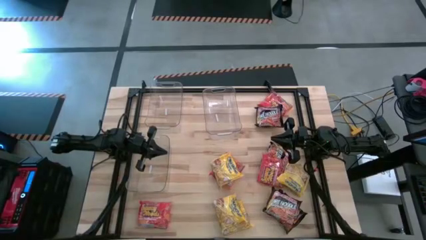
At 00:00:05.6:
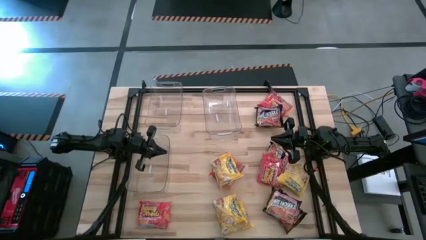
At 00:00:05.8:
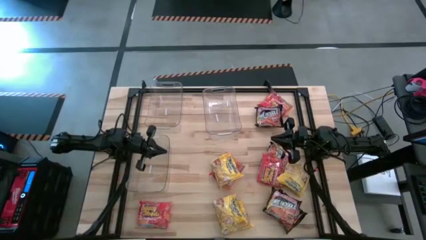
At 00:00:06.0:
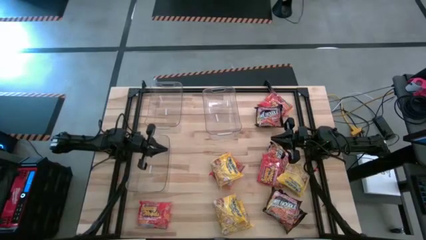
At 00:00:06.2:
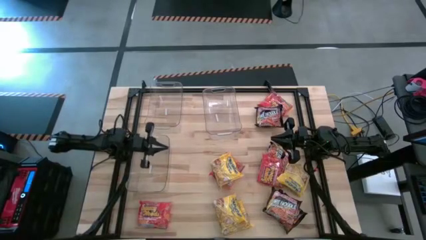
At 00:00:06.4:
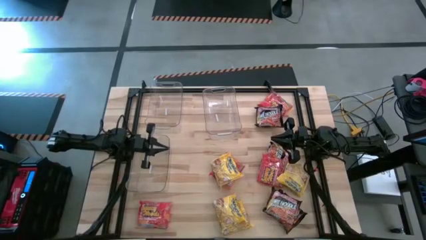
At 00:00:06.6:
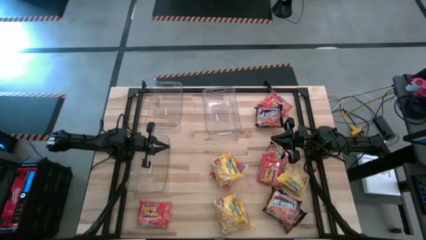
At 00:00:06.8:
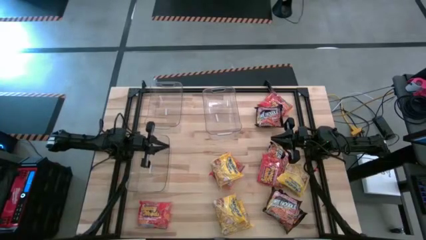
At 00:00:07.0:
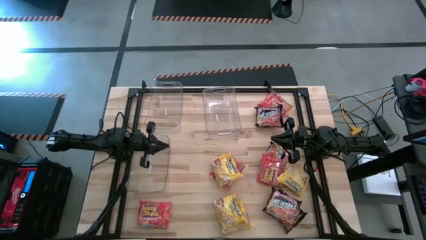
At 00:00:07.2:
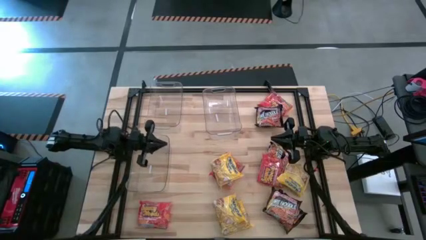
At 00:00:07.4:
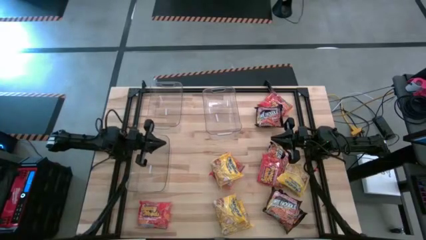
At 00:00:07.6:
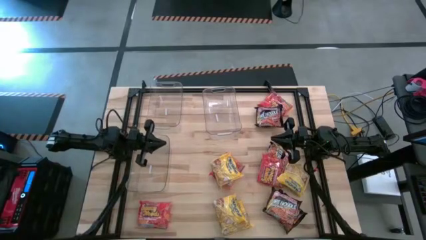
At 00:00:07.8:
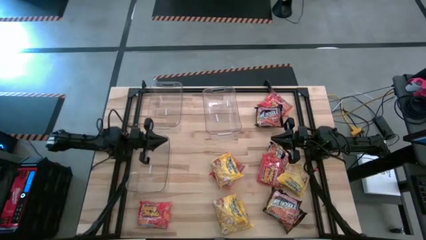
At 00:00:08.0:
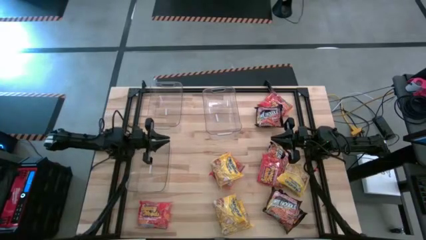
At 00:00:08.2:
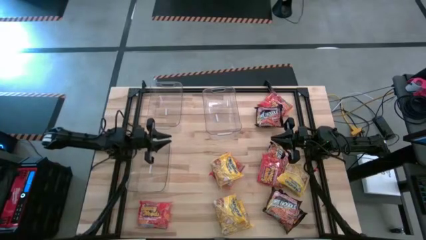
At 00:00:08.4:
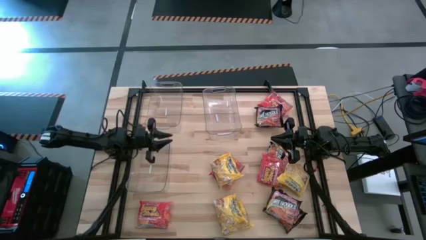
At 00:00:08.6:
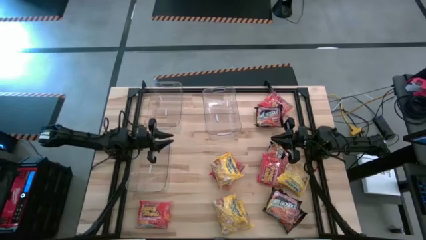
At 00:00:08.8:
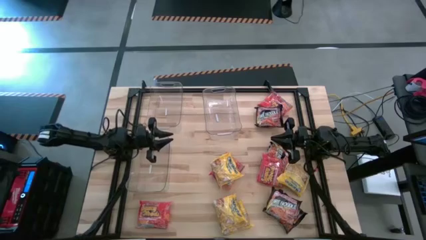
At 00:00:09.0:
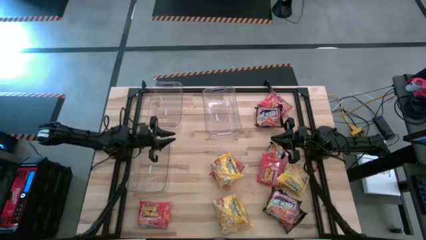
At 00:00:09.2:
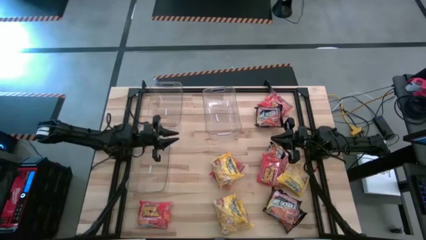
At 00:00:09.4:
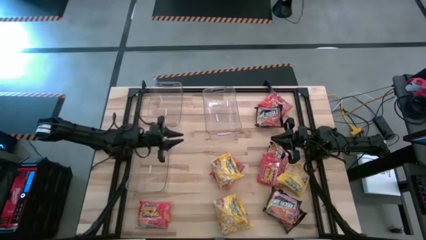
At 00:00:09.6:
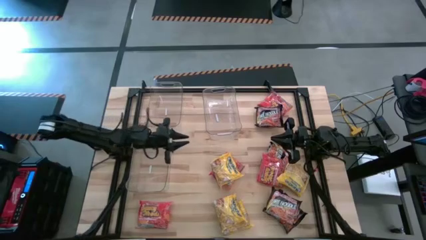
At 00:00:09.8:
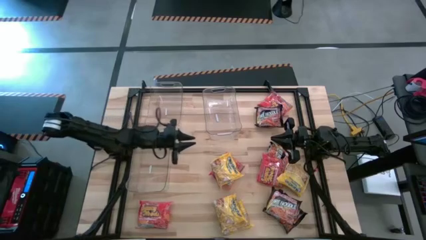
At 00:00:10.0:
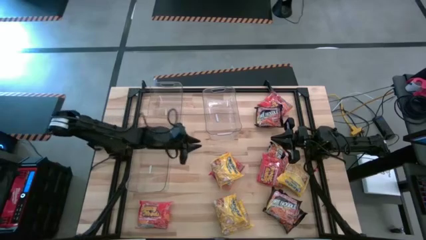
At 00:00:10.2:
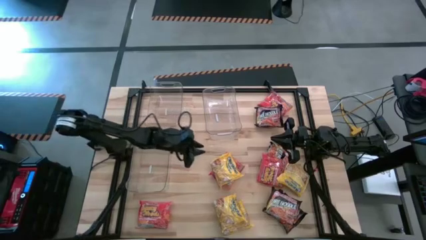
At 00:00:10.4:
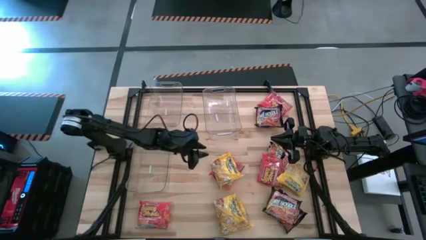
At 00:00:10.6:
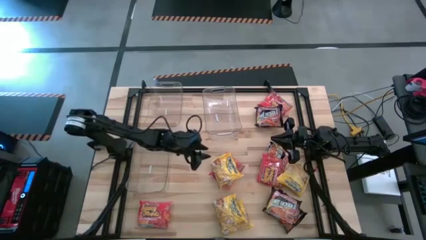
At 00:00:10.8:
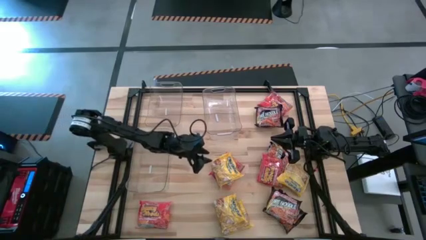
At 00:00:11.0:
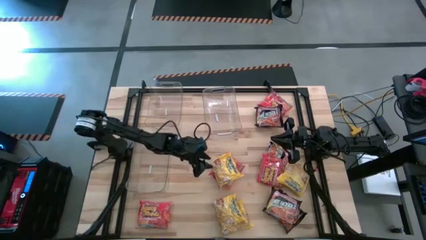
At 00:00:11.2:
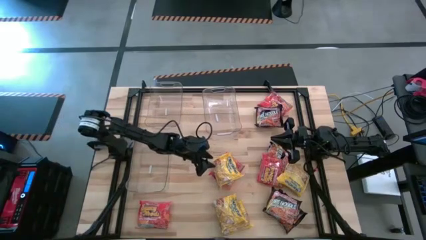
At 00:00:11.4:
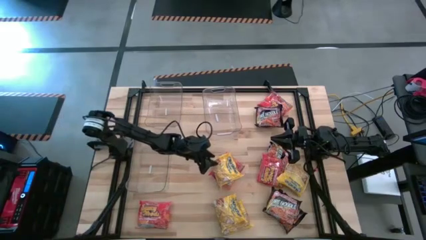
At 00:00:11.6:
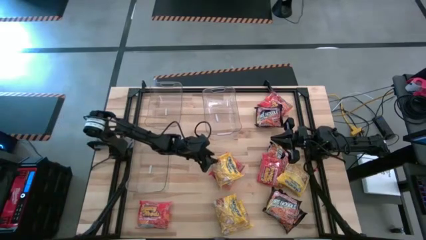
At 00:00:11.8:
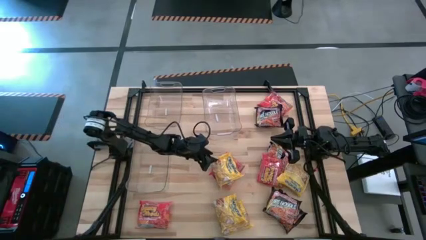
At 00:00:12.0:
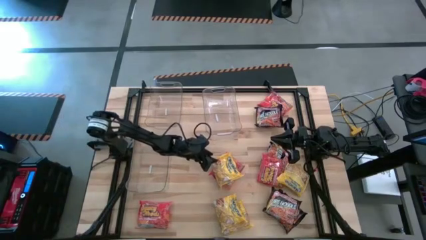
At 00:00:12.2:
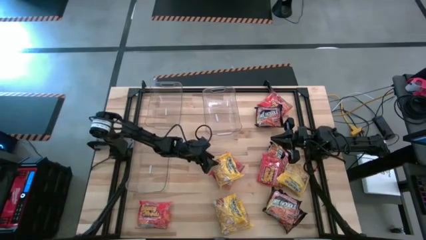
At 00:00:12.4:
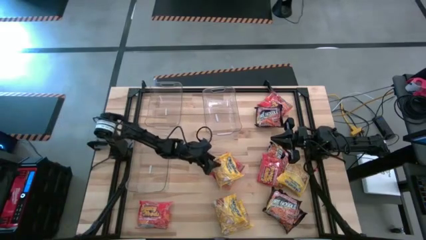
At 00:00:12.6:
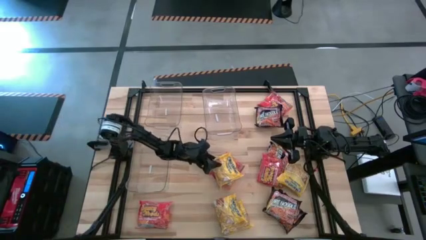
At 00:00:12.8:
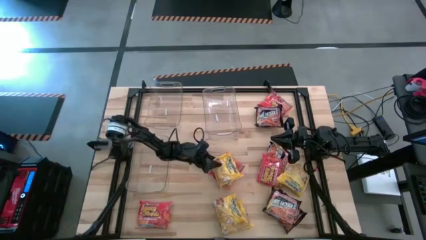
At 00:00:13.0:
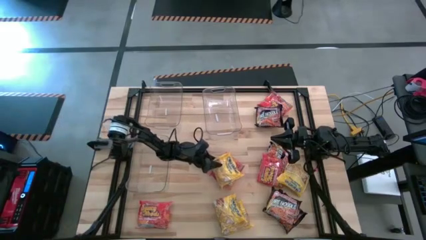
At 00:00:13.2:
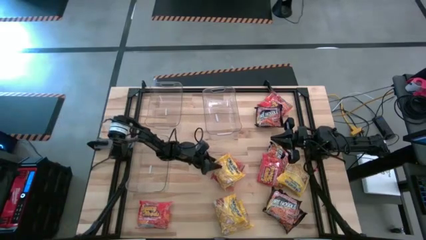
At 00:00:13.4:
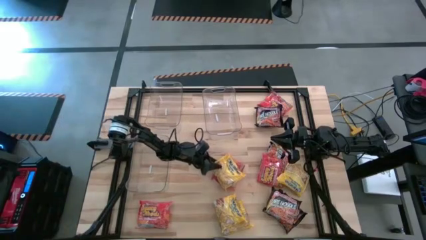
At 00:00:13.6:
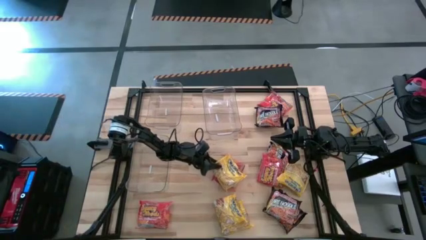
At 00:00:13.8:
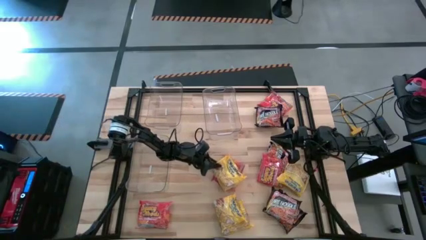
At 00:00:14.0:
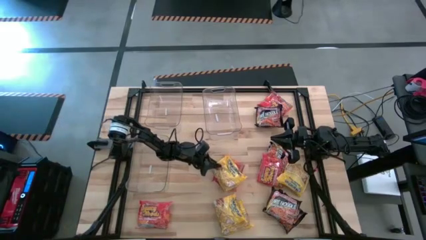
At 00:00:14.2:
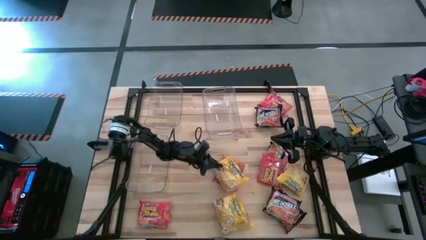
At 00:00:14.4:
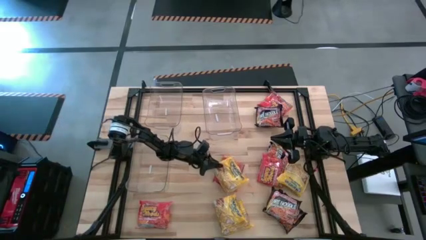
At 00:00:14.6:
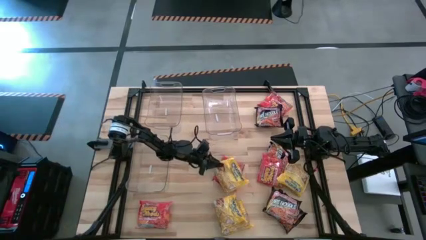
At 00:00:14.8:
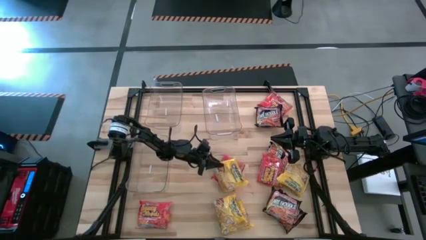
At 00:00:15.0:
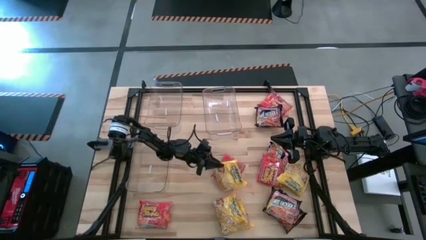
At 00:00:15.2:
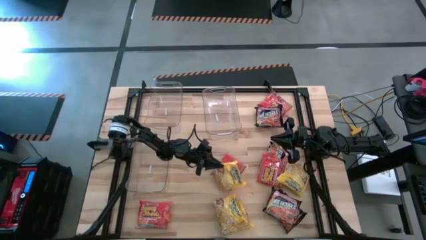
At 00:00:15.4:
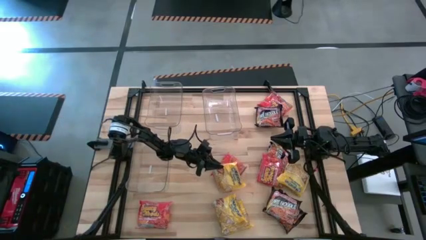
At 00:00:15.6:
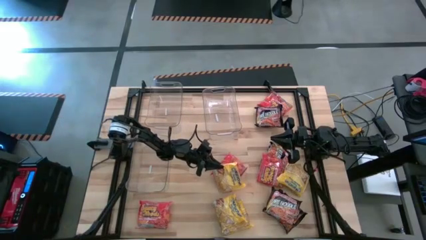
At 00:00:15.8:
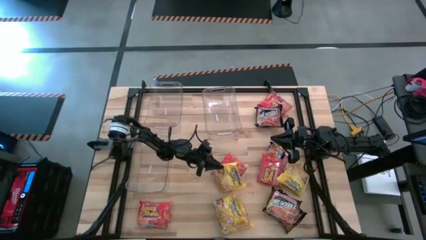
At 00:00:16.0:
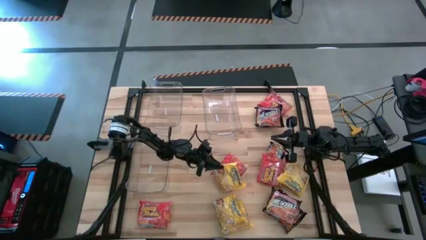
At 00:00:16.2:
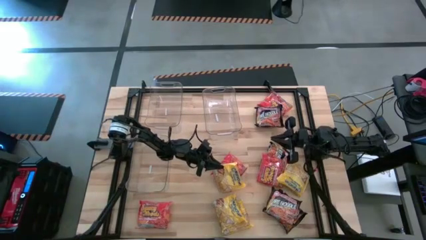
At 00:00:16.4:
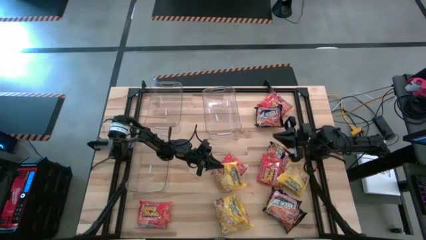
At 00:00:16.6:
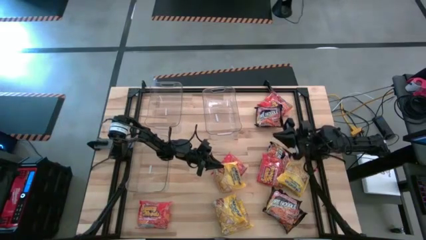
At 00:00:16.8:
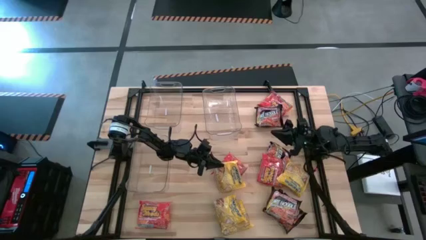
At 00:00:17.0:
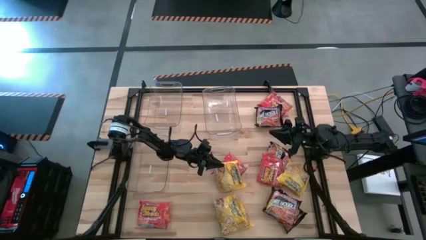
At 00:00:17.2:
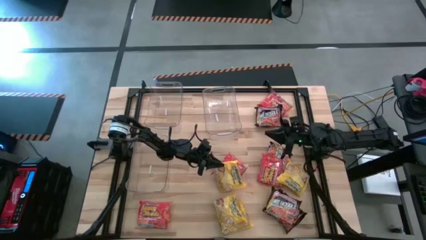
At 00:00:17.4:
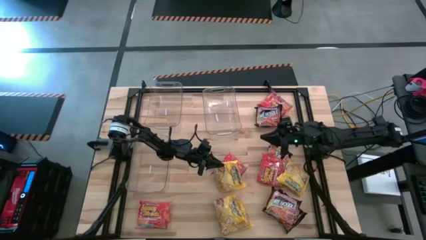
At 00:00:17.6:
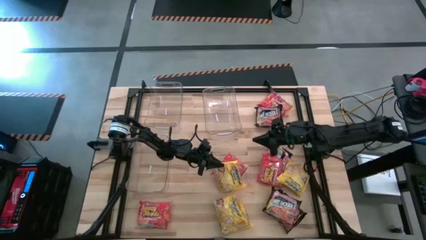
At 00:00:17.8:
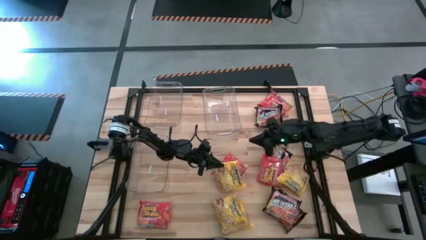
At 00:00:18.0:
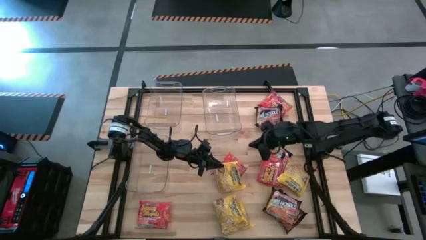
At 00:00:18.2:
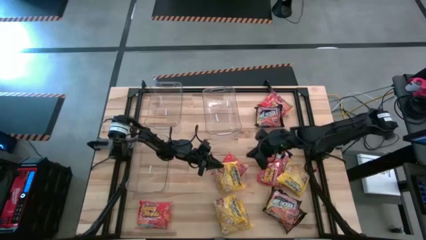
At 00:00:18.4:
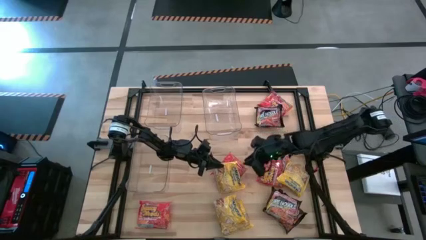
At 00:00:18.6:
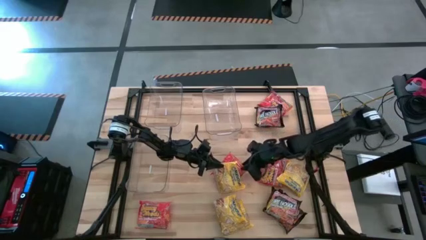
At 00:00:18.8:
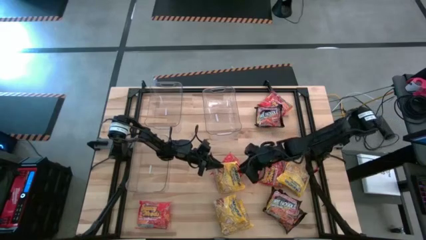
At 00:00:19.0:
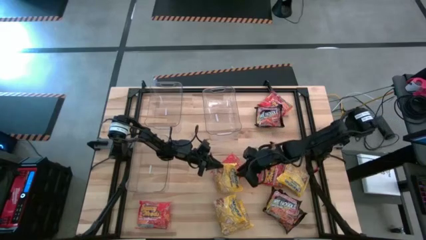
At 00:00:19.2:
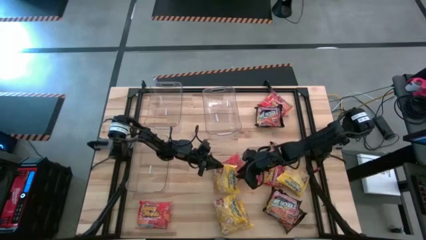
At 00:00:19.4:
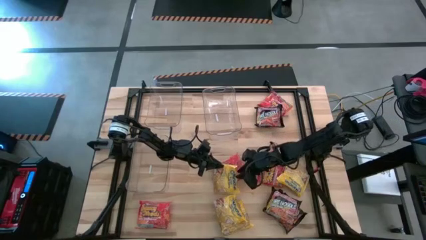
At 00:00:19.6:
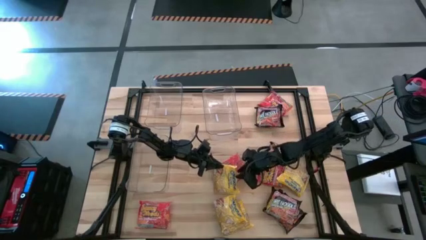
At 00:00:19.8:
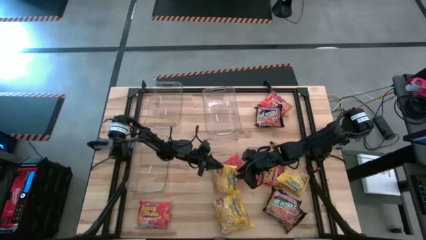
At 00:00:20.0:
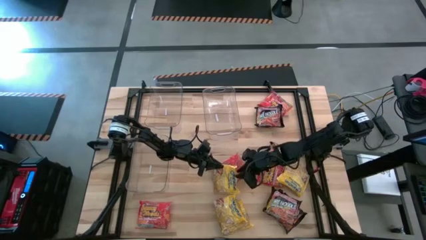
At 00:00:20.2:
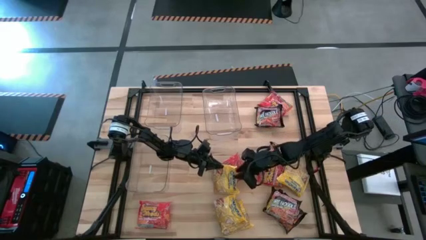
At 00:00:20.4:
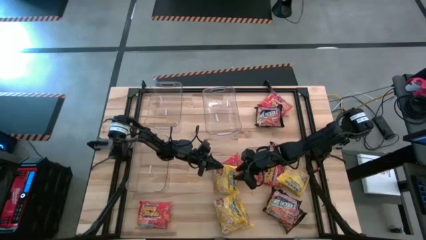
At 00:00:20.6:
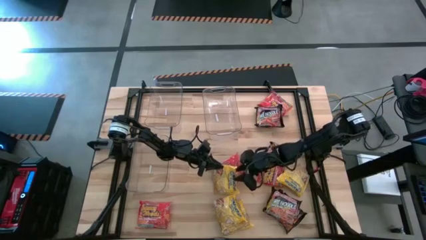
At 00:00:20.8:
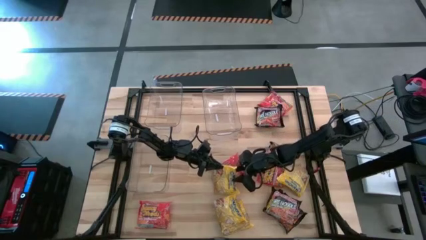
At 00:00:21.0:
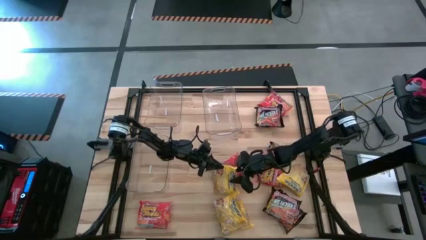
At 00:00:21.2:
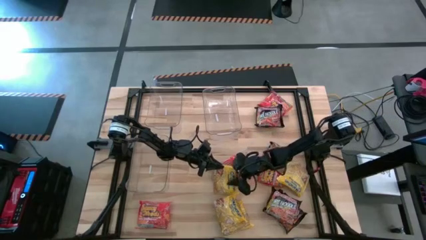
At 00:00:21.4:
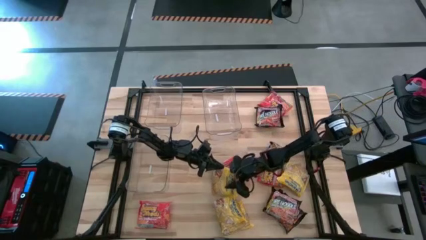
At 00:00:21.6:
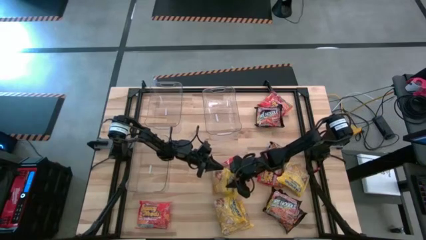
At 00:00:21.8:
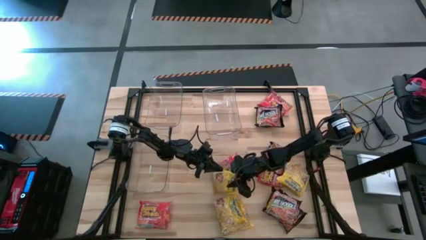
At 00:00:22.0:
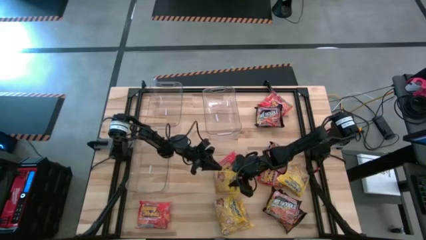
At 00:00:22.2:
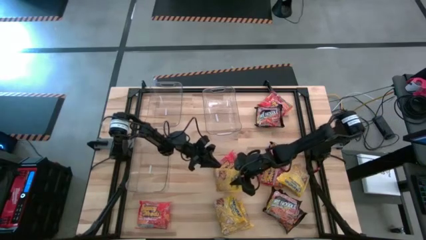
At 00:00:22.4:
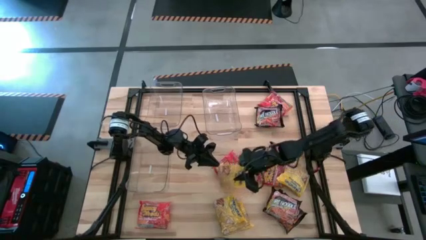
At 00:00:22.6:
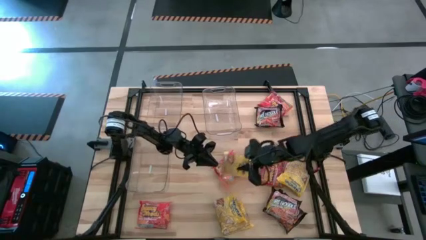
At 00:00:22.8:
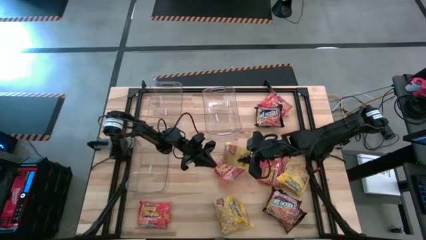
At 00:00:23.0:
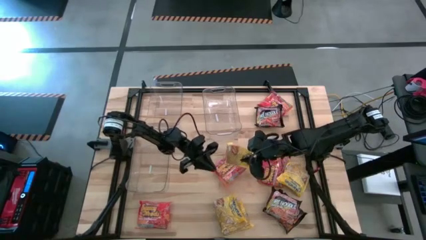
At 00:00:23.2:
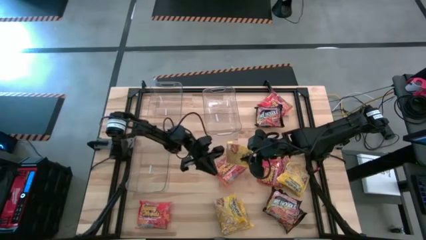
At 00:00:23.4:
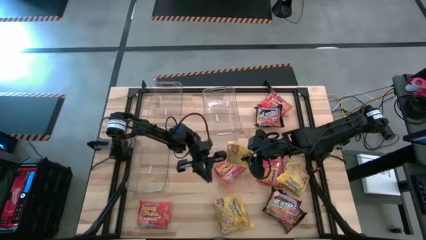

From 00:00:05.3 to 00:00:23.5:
Task: Sort Maruchan noodles
Put the yellow noodle pack into the top left transparent bin
